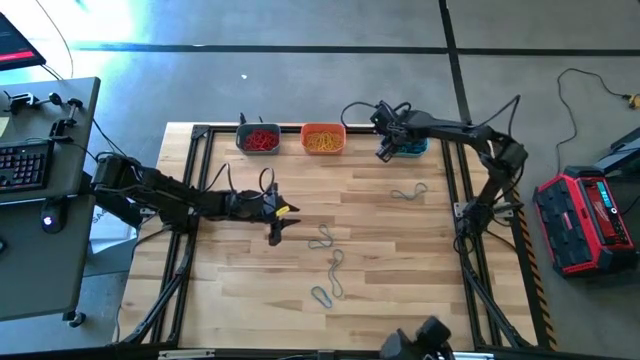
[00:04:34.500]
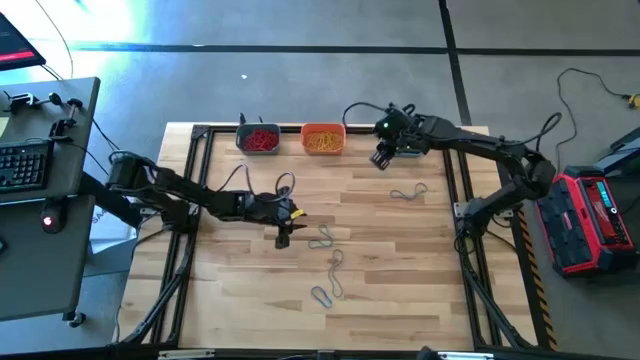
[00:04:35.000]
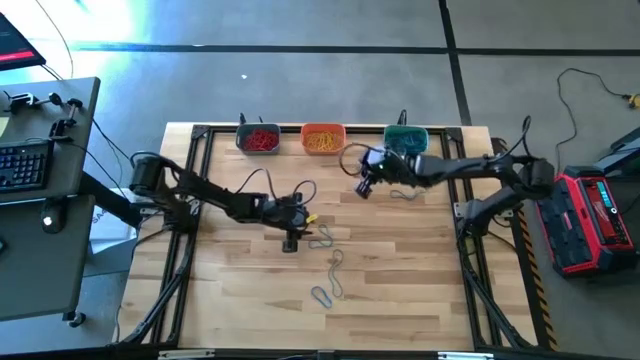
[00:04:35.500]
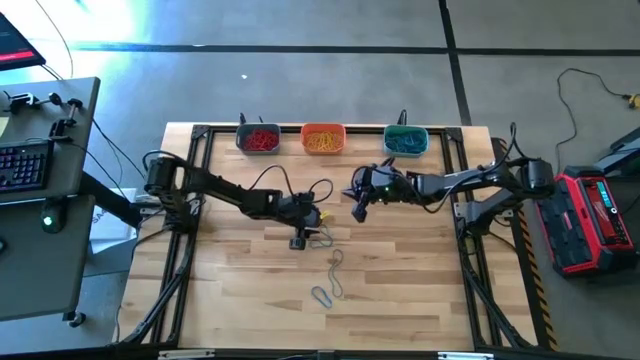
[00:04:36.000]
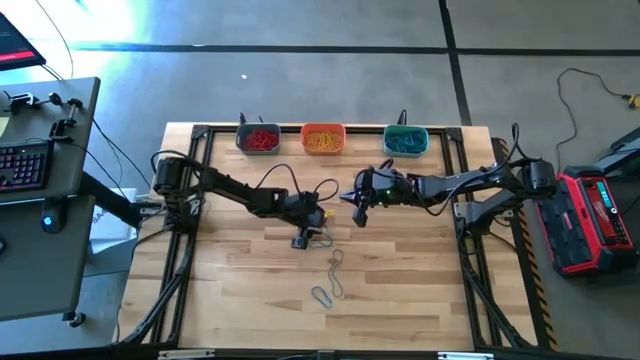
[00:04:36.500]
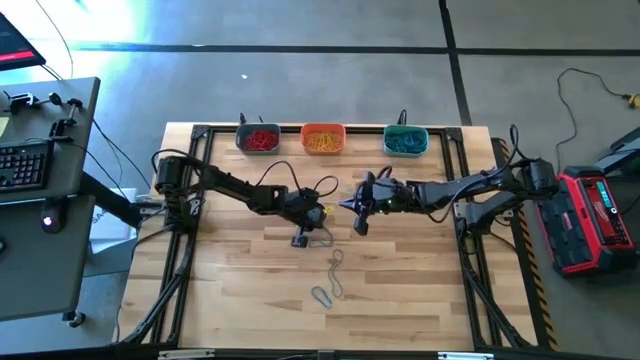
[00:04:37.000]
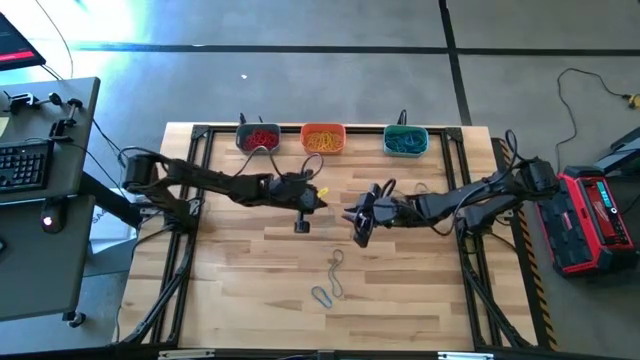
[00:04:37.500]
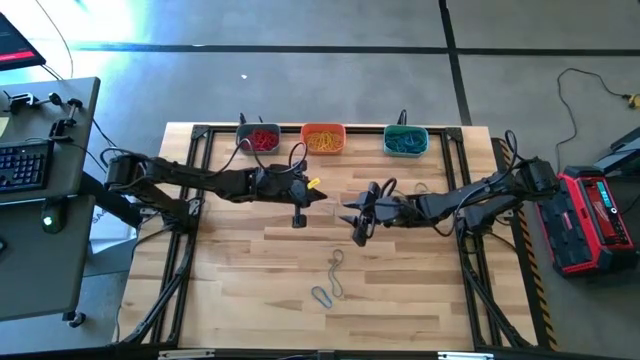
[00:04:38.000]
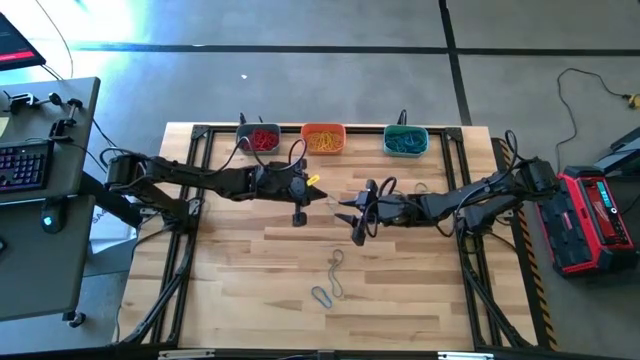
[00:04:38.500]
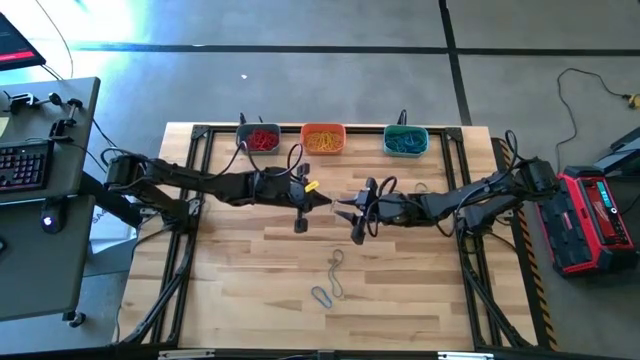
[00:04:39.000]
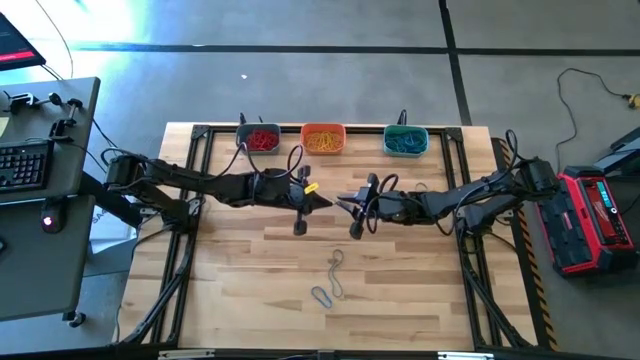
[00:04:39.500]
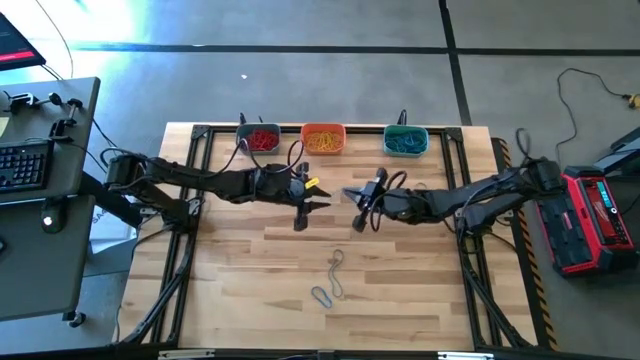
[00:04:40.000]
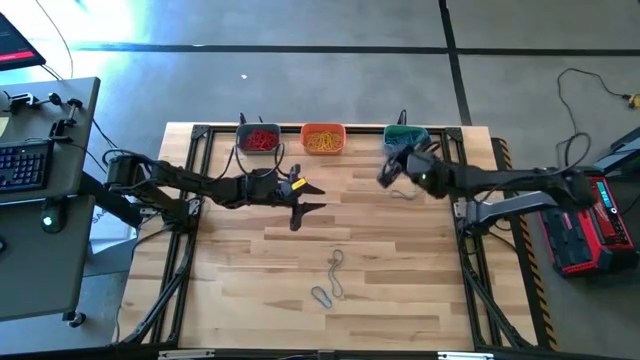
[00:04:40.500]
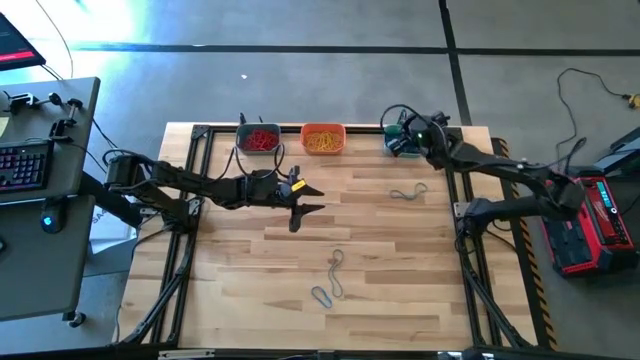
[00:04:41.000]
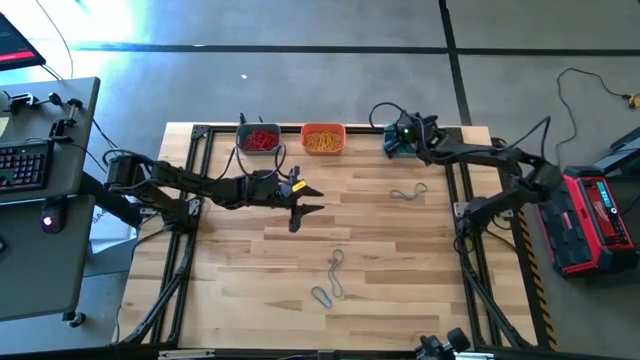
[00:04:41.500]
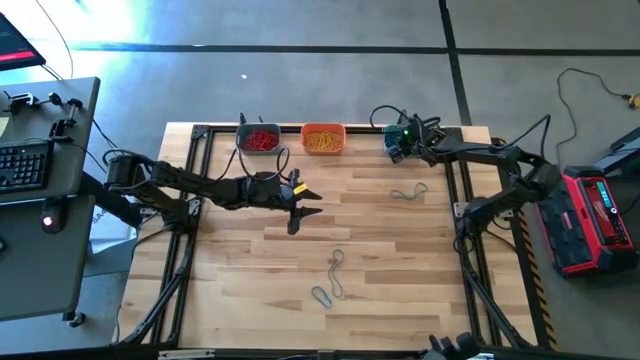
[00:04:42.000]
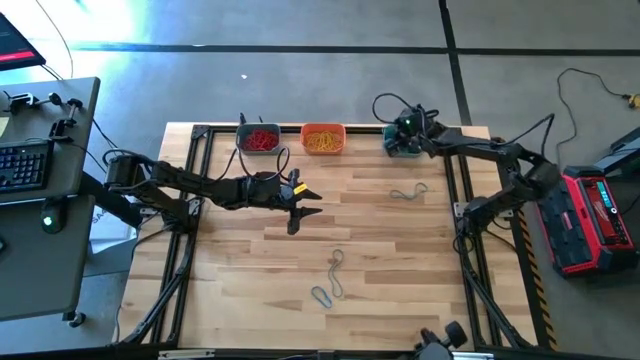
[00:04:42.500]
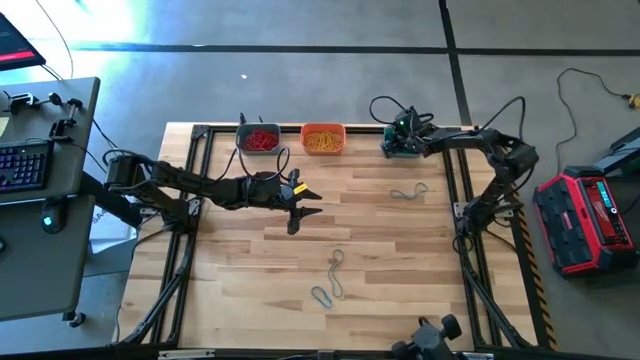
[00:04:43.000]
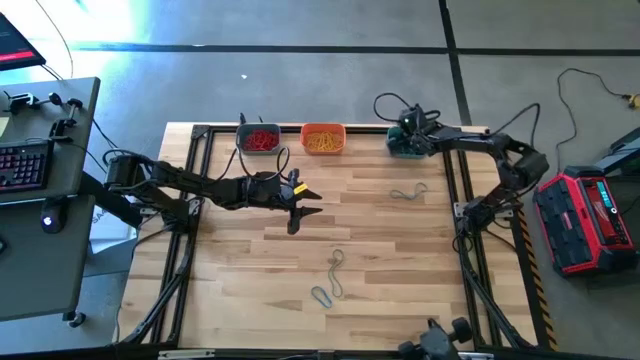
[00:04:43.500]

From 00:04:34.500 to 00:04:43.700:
Task: Sort rubber bands into baskets
Put the blue rubber band into the light blue bin

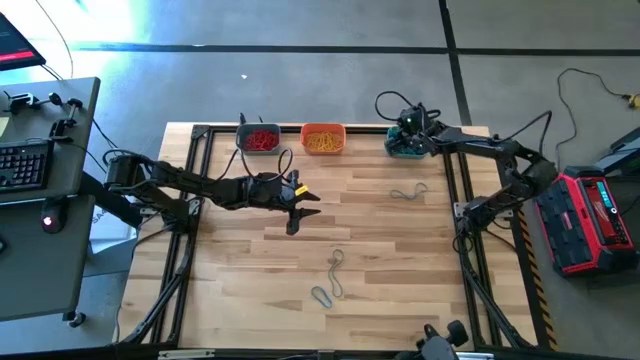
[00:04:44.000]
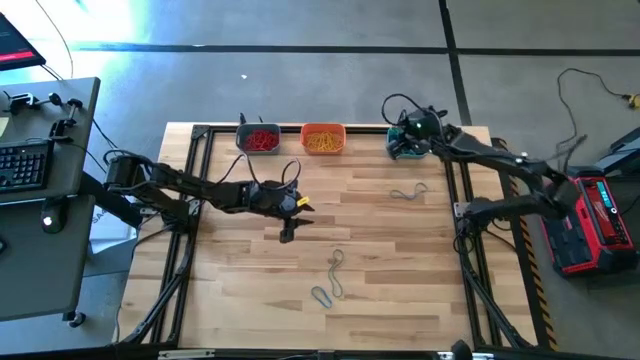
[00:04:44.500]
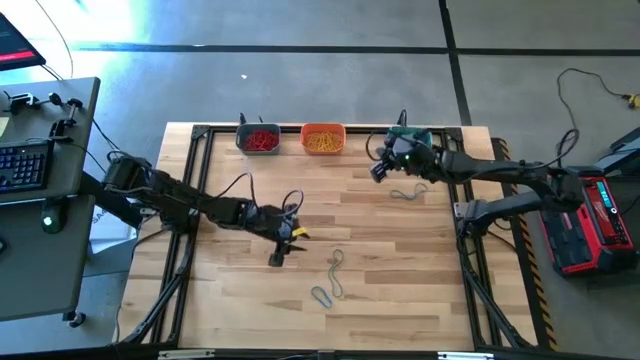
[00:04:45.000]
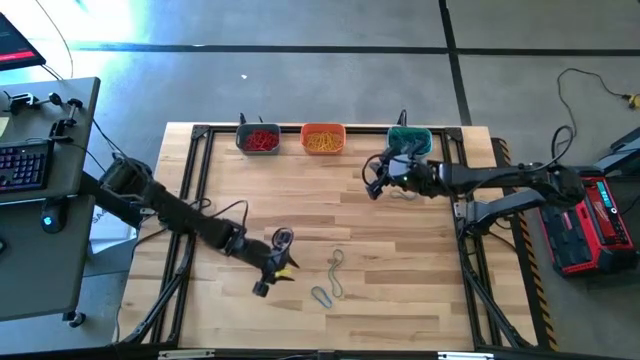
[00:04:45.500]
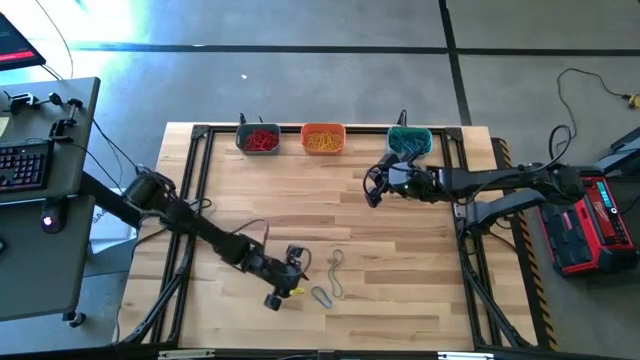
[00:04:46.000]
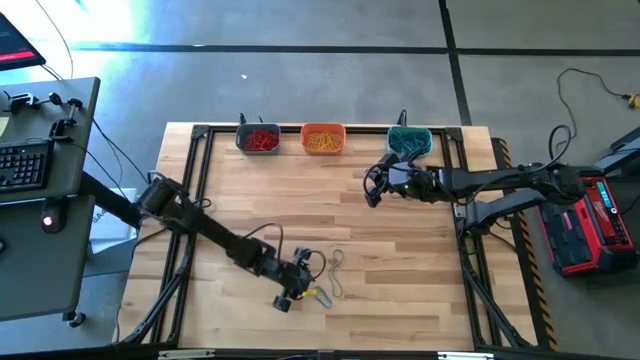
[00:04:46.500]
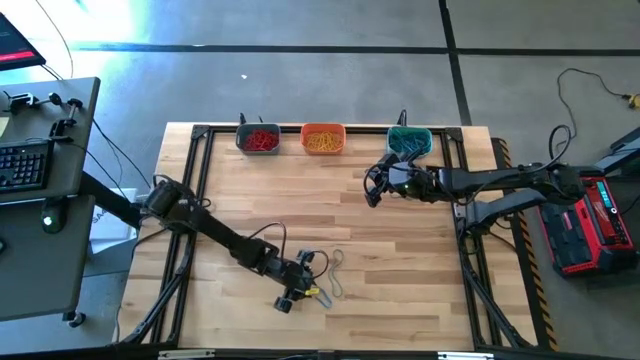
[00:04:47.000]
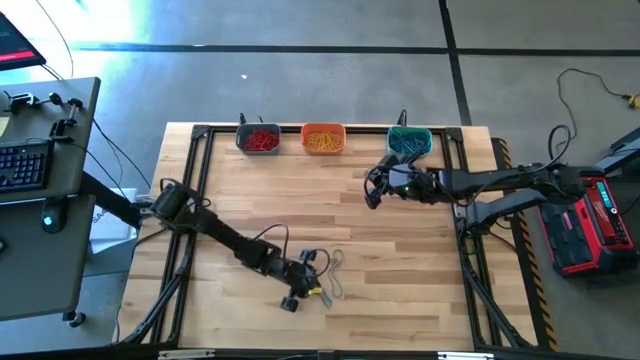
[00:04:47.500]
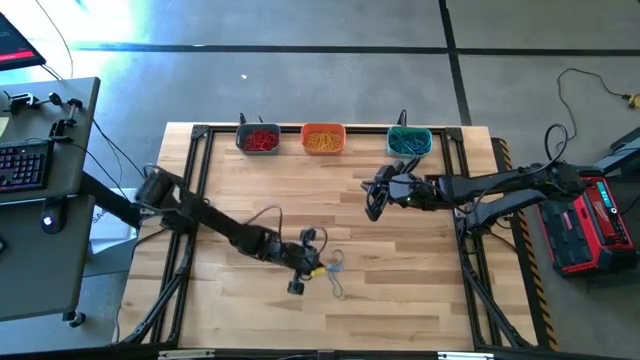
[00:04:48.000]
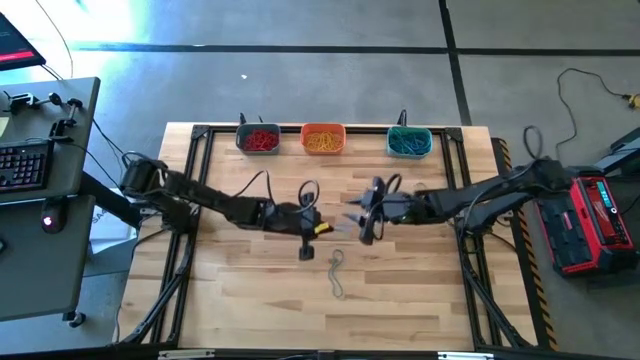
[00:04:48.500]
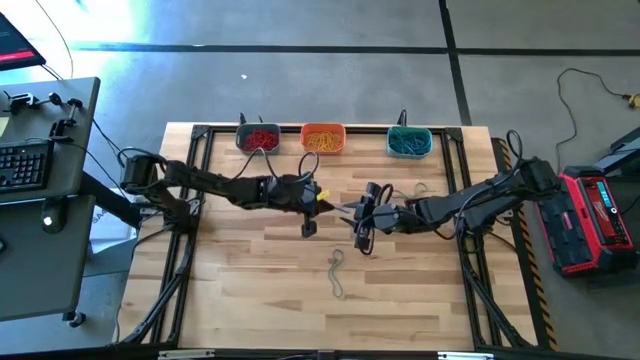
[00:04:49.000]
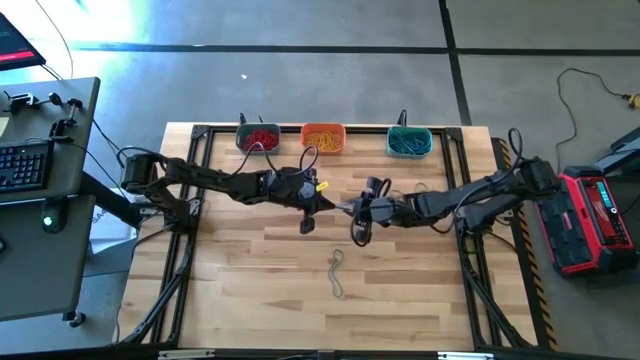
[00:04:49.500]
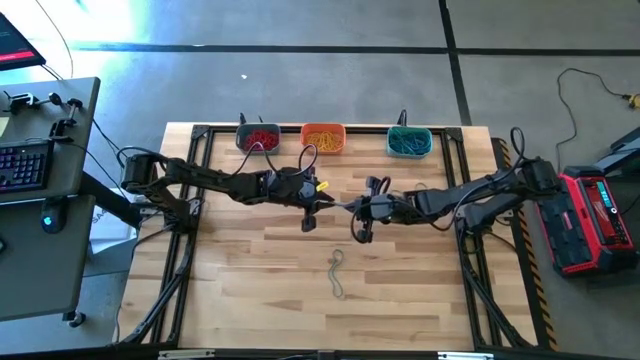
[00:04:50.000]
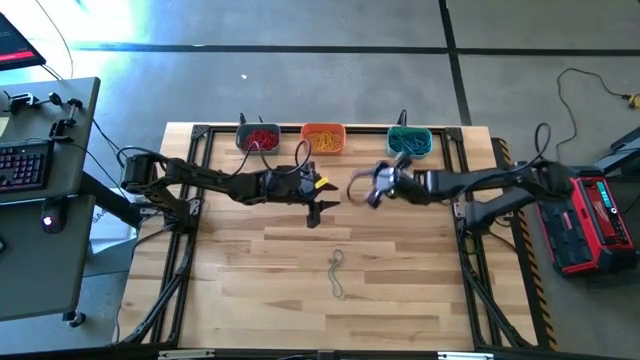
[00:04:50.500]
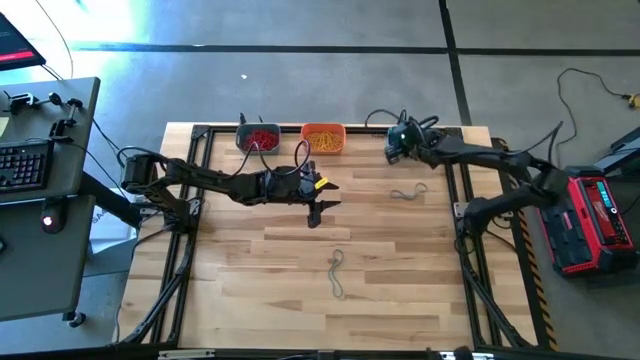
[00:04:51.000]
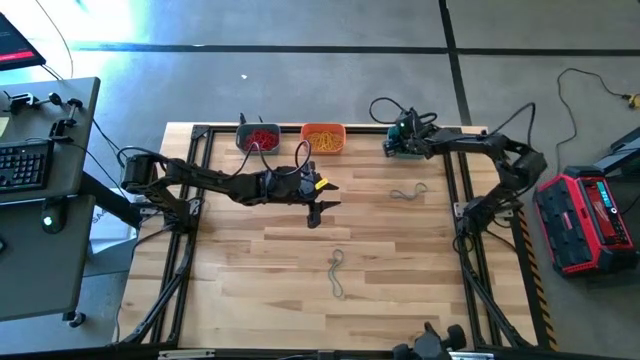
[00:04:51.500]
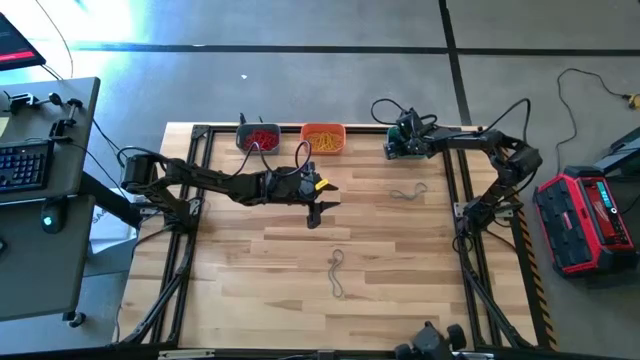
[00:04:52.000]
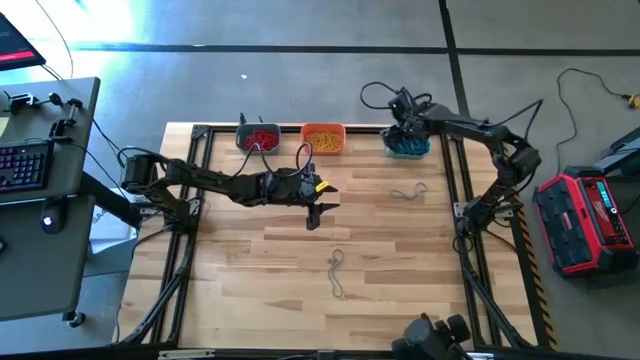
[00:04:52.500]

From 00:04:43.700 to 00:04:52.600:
Put the blue rubber band into the light blue bin

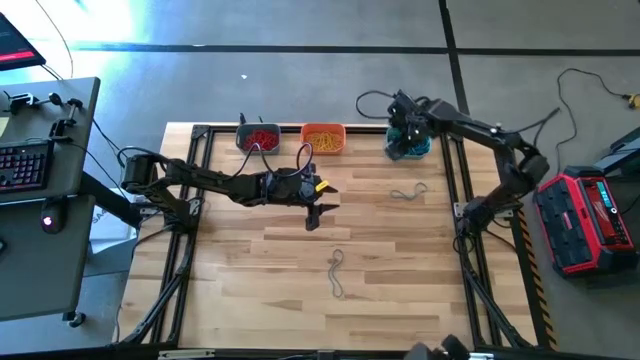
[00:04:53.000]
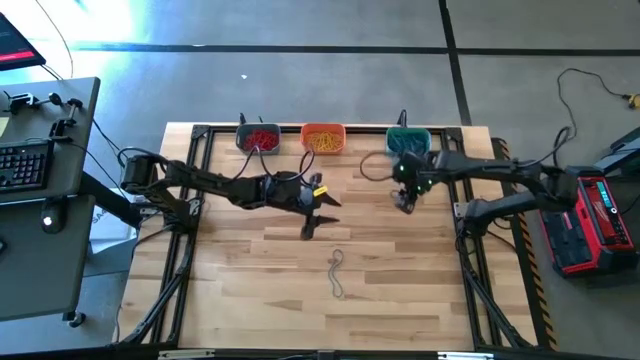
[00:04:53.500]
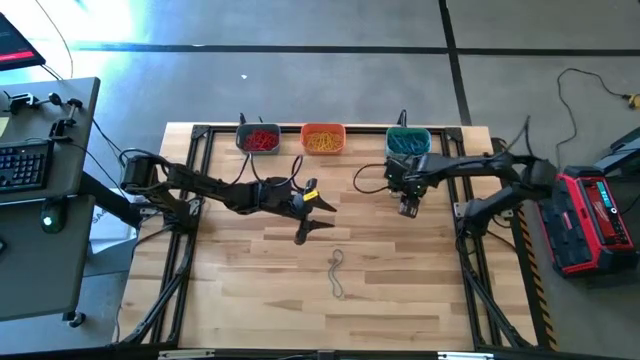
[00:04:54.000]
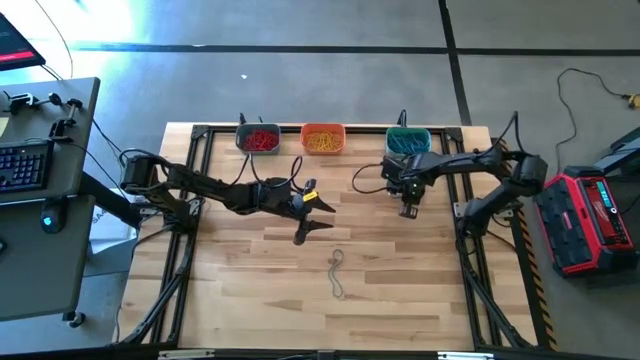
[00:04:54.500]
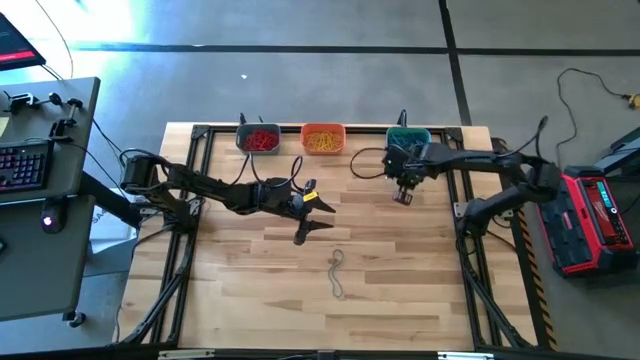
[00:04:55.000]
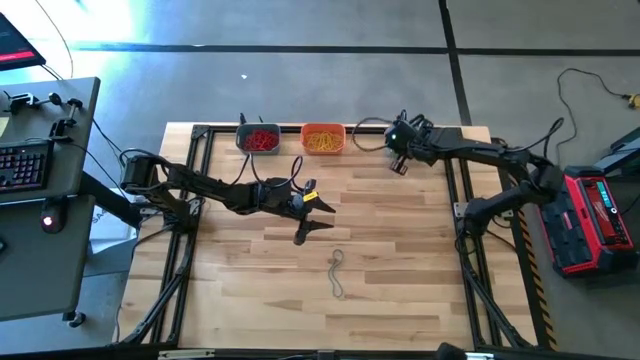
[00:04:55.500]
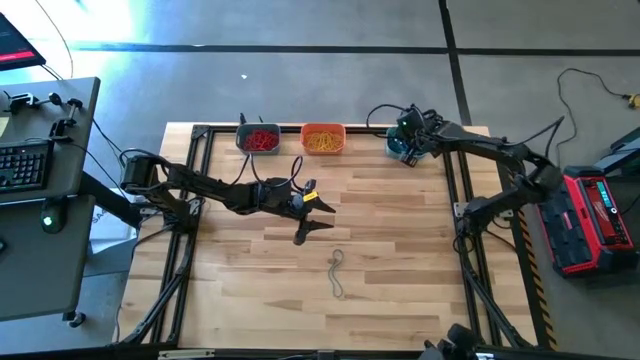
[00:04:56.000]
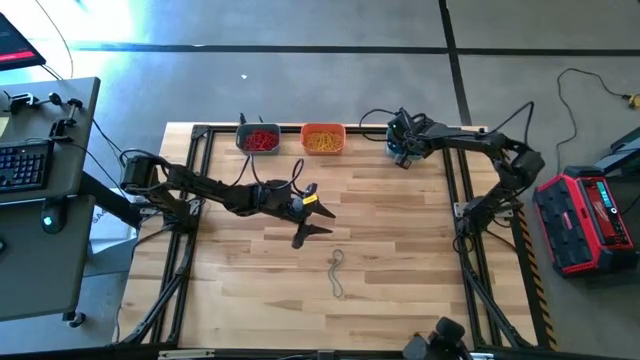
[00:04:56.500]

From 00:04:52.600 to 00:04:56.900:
Put the blue rubber band into the light blue bin
